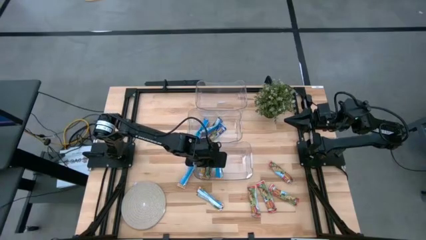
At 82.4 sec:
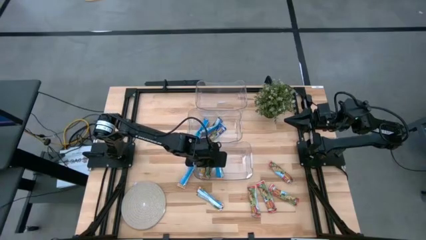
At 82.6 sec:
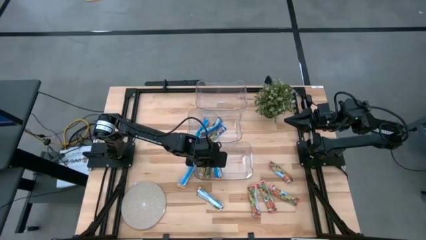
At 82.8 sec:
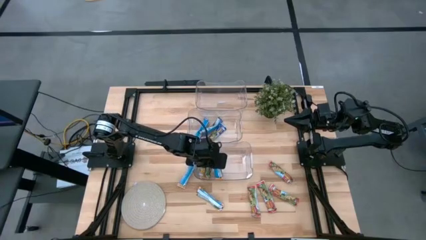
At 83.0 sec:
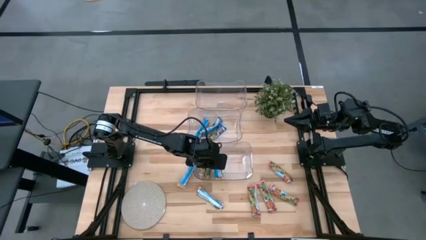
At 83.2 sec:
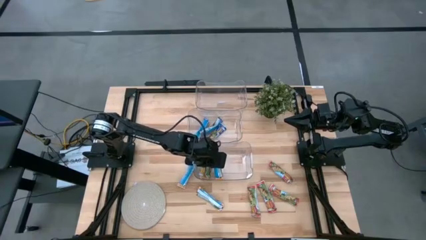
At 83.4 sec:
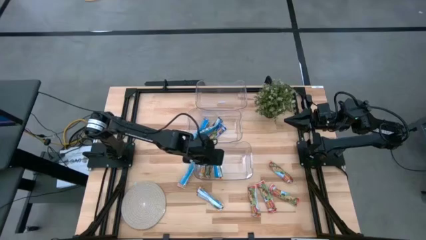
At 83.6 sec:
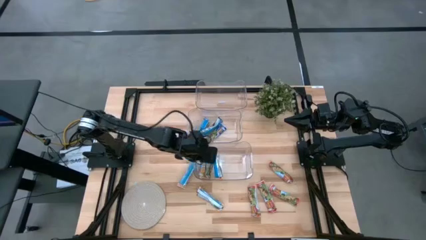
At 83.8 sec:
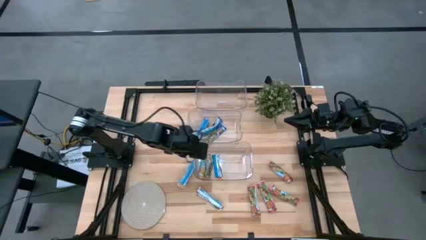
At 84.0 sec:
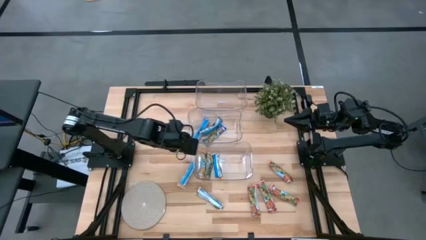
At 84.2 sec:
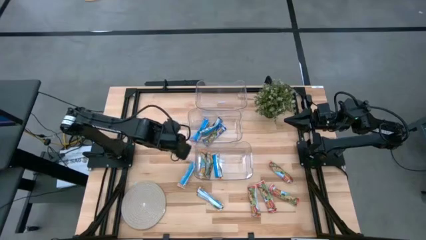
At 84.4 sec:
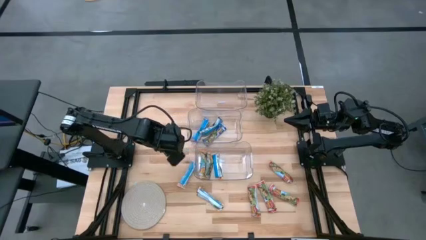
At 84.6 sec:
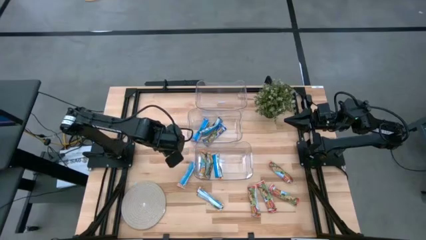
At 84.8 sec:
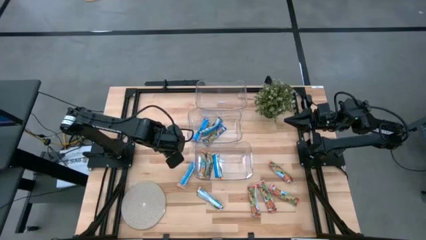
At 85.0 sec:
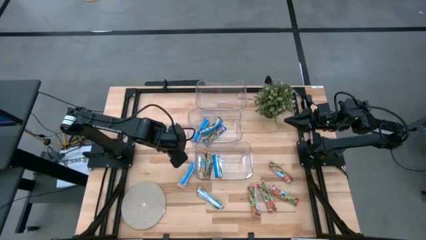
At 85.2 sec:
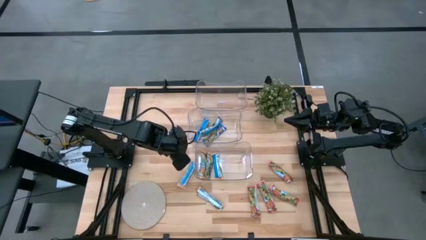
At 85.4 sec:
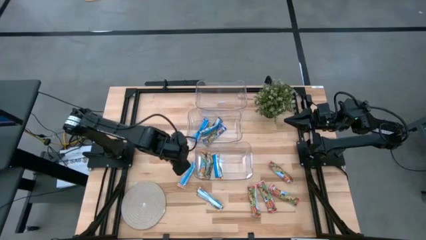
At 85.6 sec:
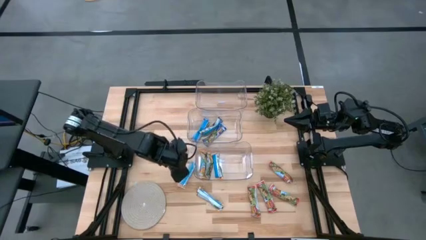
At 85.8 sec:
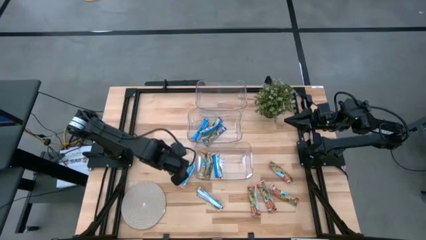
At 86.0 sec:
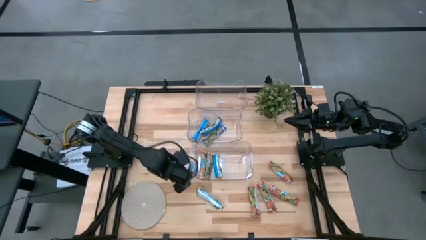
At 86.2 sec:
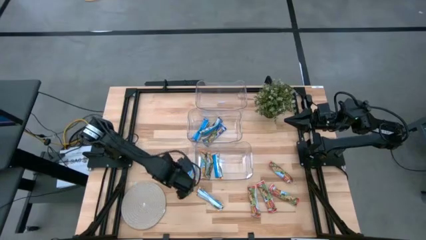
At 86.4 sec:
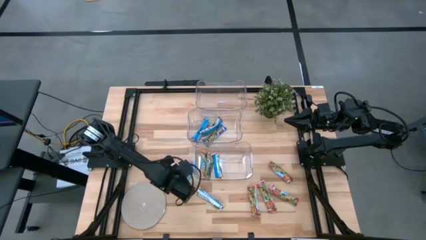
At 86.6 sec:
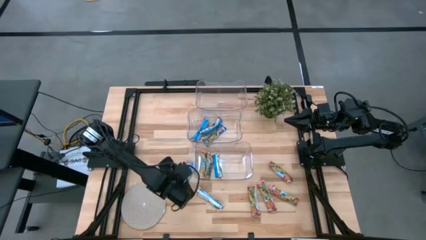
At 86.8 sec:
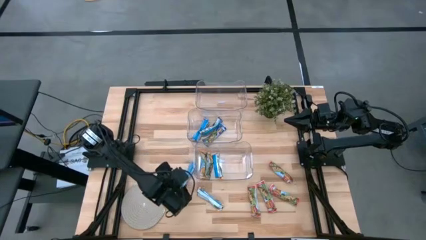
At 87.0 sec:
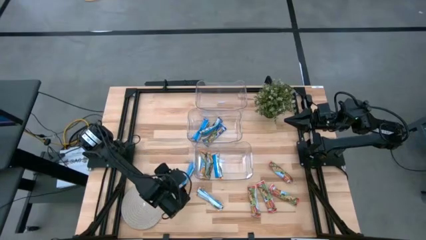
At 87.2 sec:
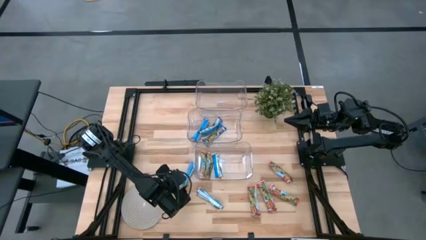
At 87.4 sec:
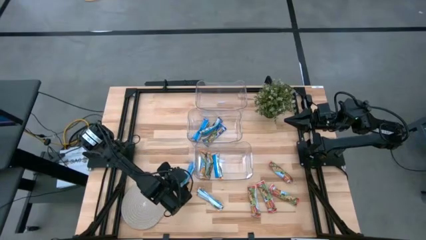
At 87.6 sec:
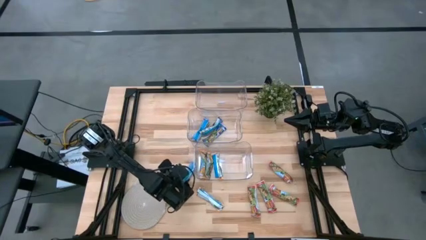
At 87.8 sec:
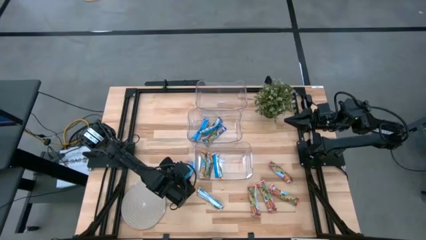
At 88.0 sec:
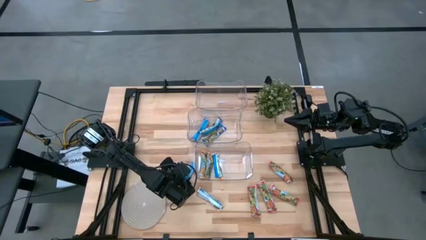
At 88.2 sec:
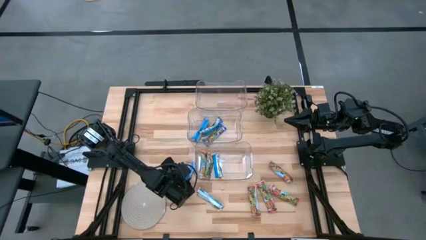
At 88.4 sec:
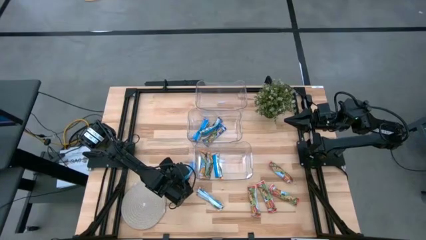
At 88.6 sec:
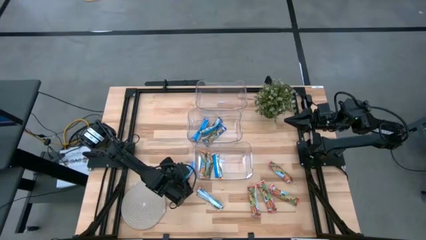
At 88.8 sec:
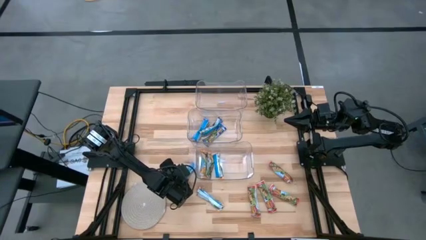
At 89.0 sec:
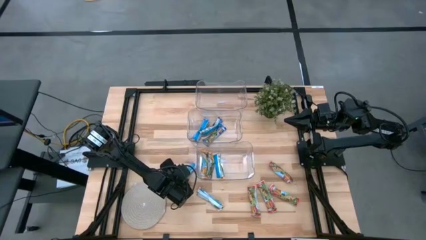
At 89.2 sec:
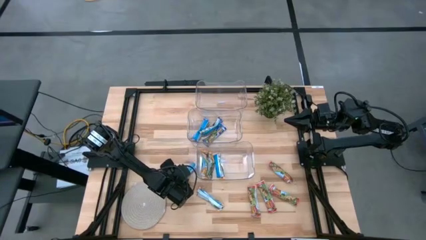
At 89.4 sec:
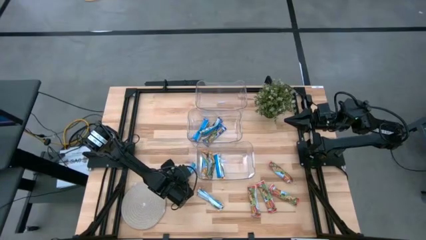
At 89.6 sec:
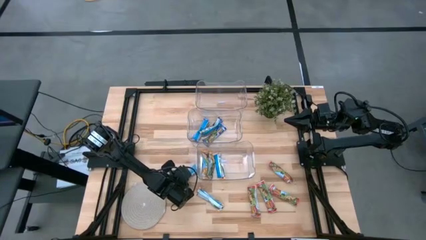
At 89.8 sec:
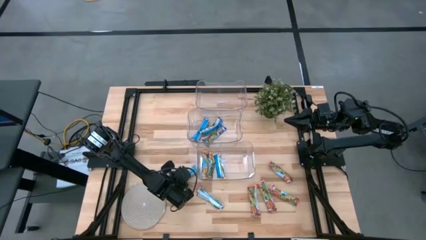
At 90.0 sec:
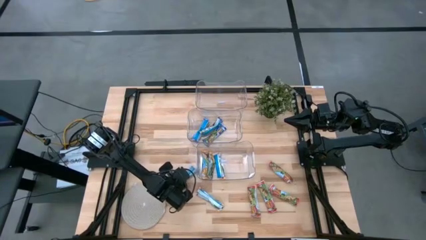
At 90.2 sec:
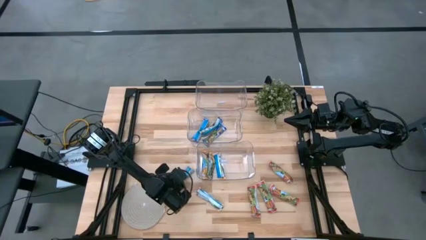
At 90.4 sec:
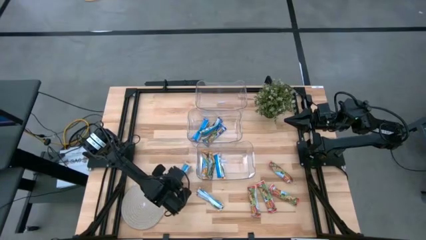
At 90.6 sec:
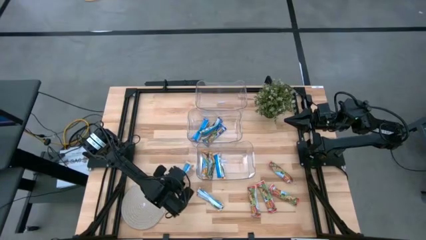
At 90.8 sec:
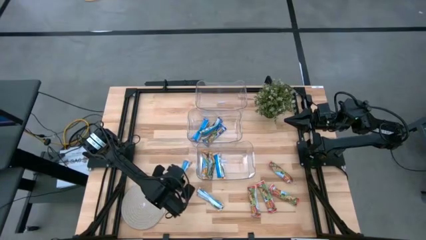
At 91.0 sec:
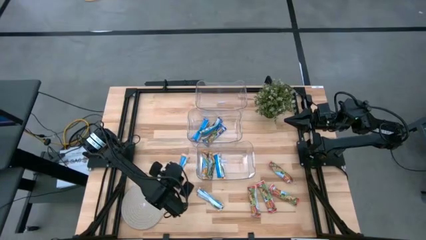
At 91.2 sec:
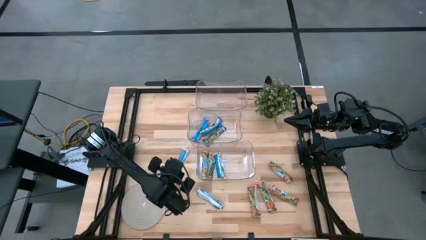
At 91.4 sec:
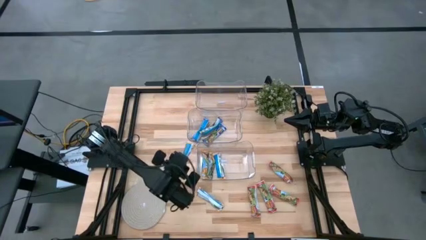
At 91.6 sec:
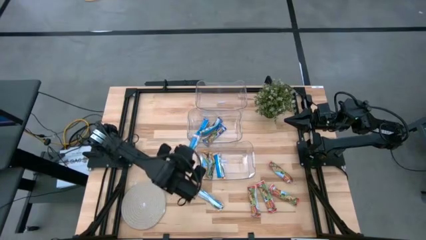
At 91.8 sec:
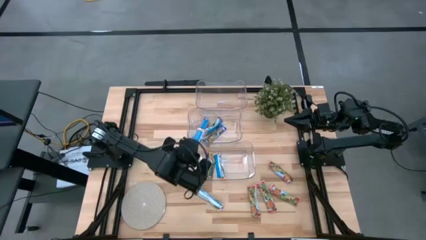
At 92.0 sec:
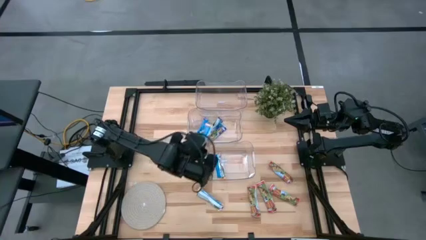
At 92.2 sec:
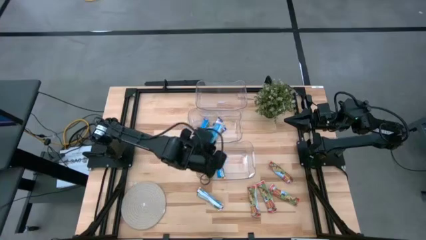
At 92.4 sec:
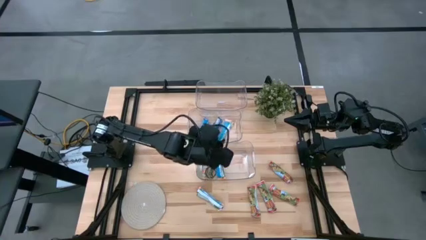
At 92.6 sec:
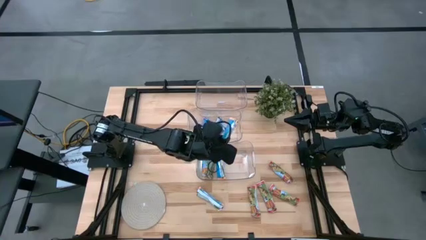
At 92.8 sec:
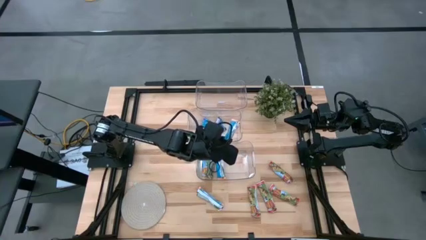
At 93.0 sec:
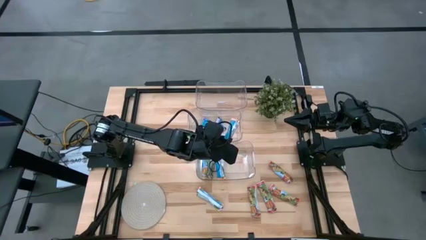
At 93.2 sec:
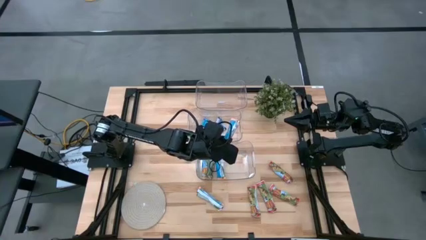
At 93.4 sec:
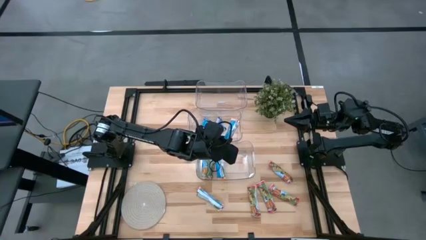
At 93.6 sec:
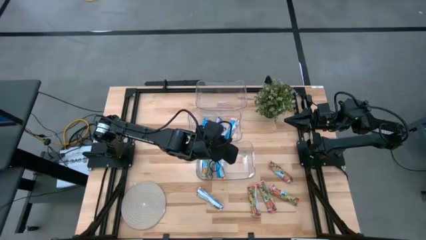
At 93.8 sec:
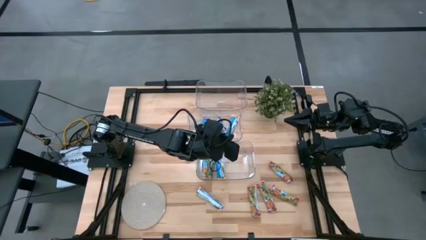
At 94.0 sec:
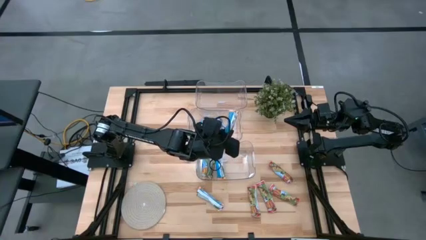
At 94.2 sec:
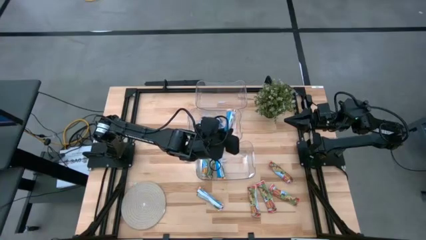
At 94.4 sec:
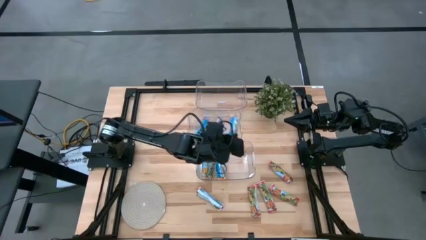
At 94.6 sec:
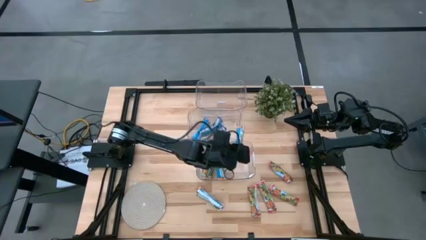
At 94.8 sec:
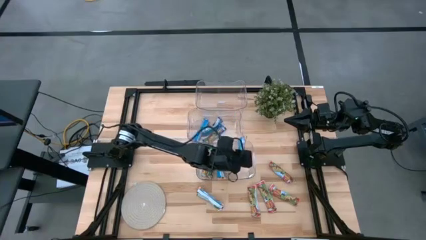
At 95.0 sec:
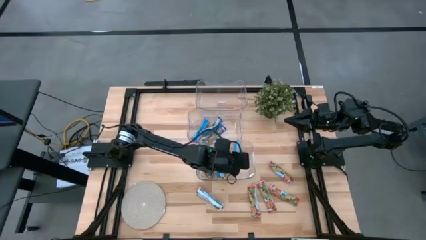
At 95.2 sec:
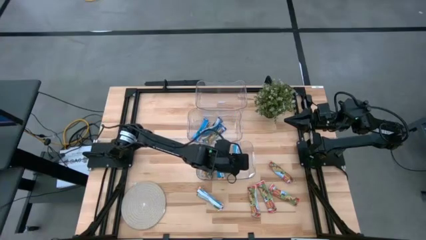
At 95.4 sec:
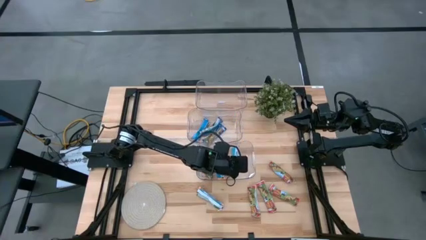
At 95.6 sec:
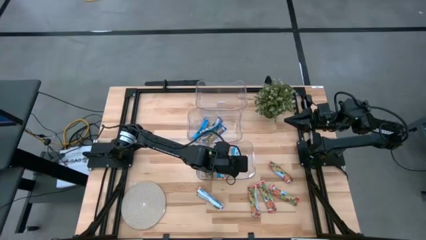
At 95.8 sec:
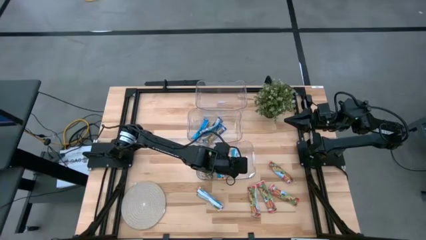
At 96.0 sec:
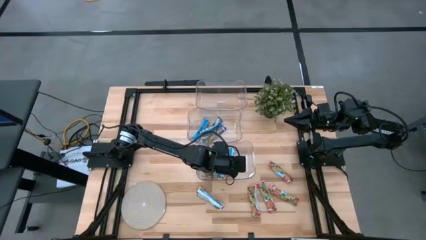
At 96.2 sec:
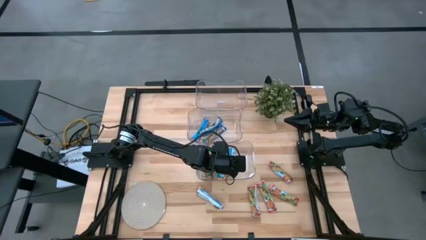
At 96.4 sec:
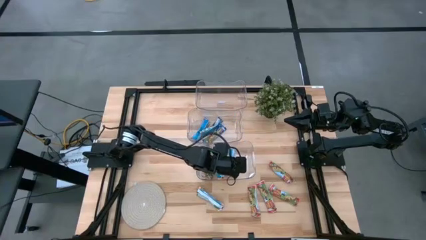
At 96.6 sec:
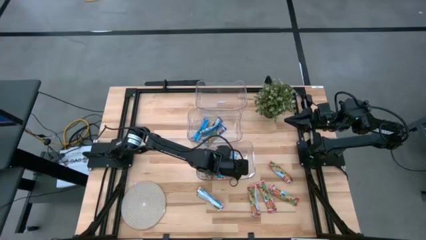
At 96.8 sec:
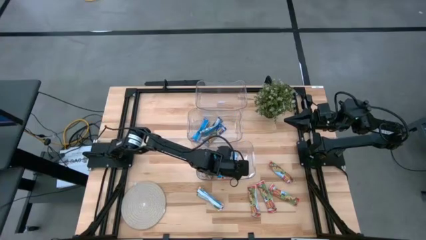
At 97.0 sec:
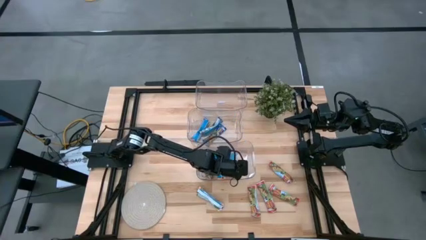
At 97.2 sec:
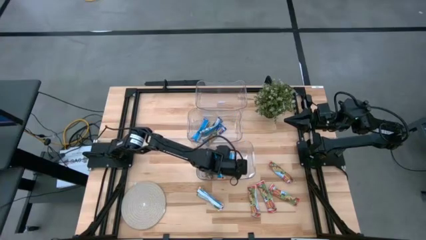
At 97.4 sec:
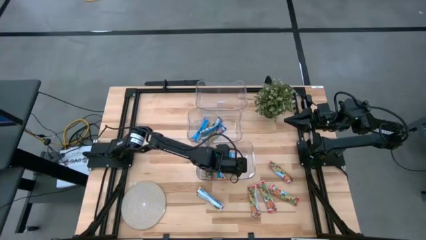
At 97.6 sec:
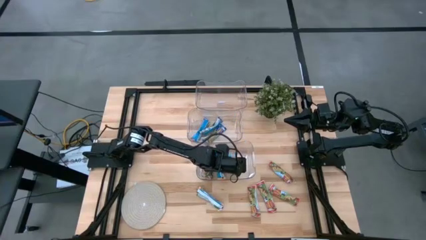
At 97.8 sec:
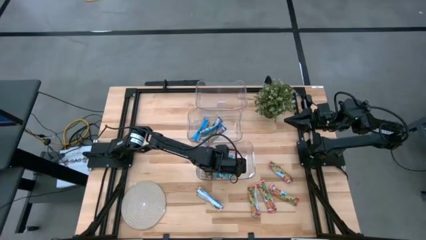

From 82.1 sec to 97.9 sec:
Task: Pick and place Granola Bars by type
Put the yellow granola bar into the bottom transparent bin
